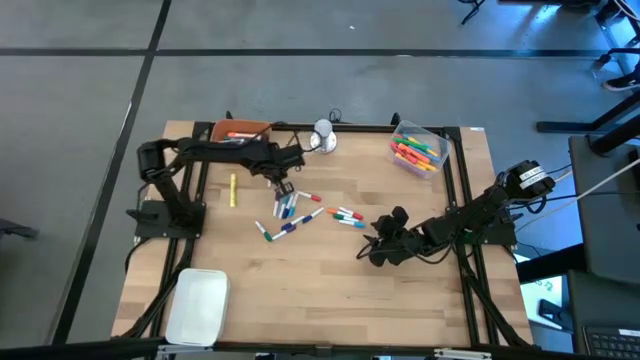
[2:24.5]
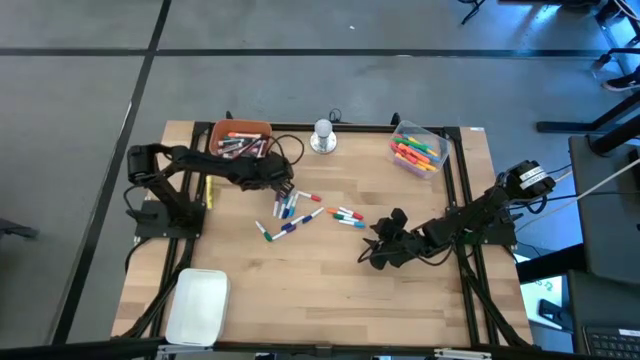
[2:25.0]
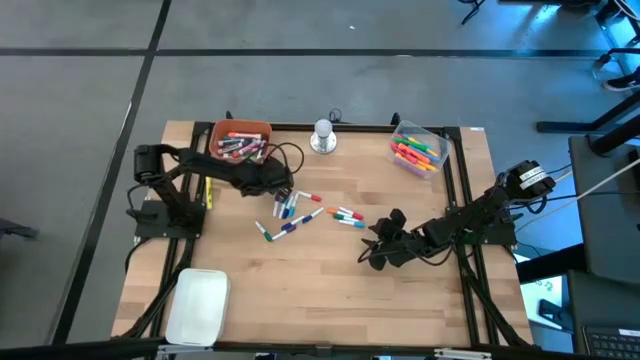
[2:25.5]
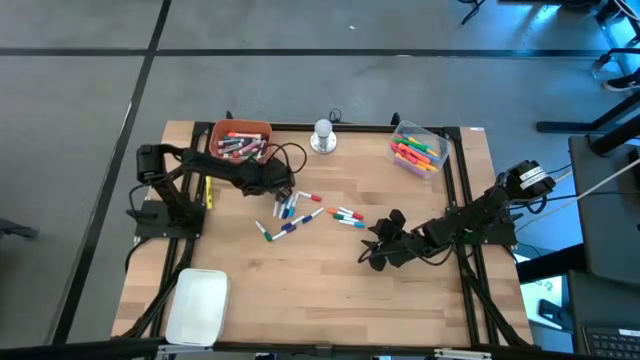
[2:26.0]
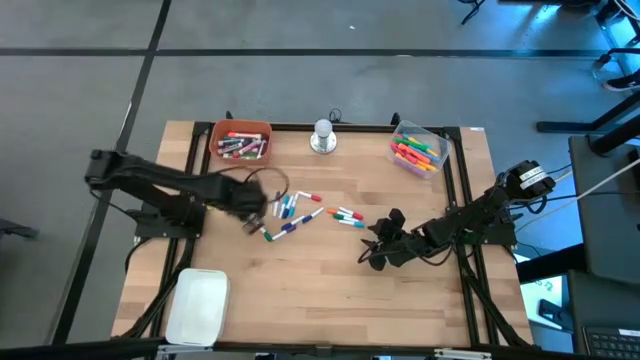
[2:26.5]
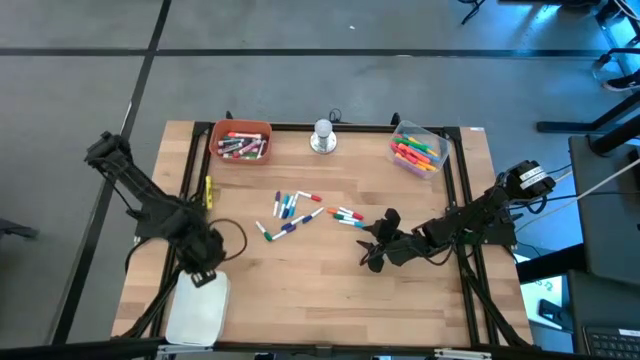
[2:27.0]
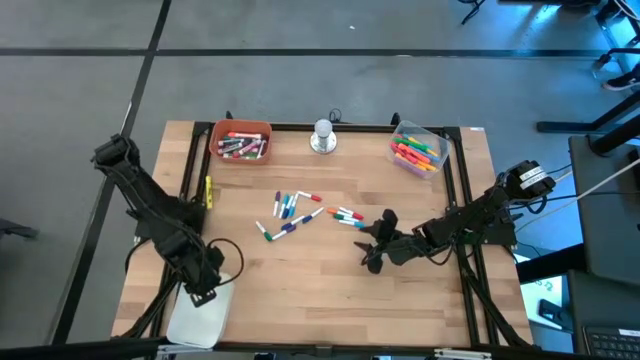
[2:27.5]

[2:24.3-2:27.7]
Task: Pick & Place Markers
Put the small yellow highlighter pen into the white bin

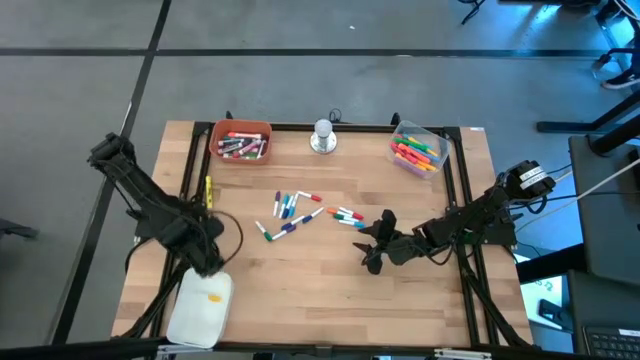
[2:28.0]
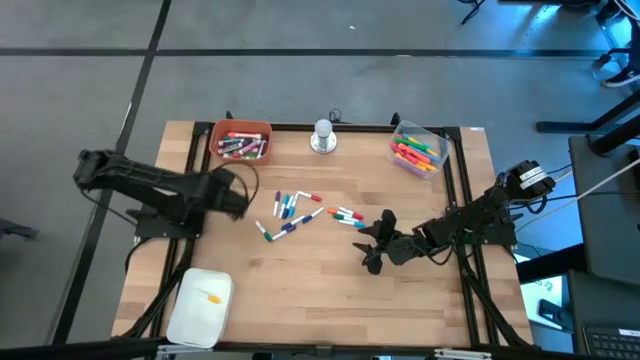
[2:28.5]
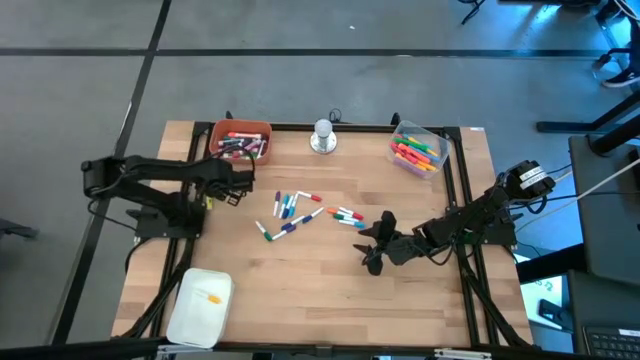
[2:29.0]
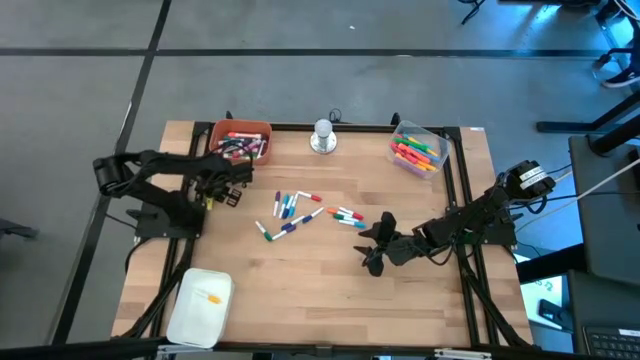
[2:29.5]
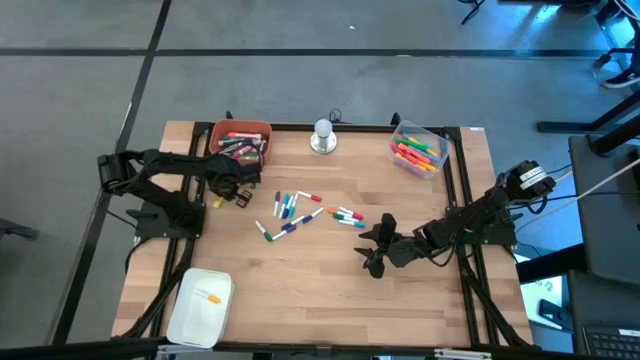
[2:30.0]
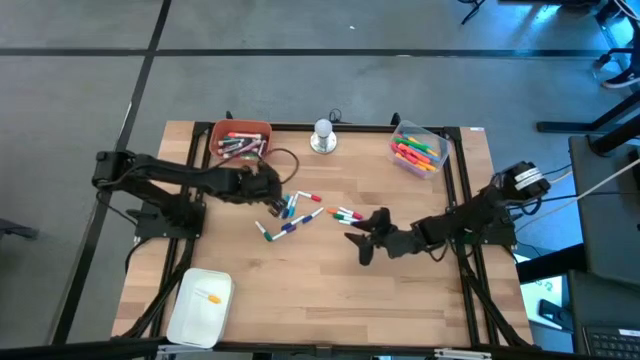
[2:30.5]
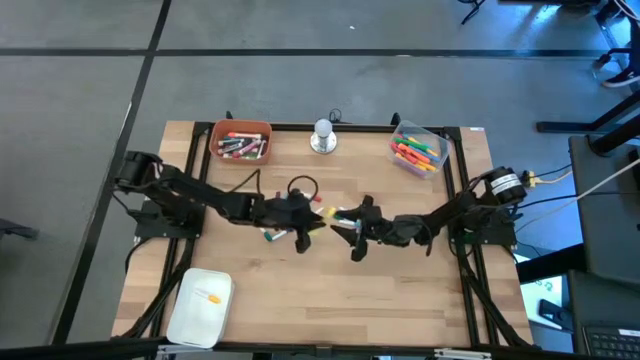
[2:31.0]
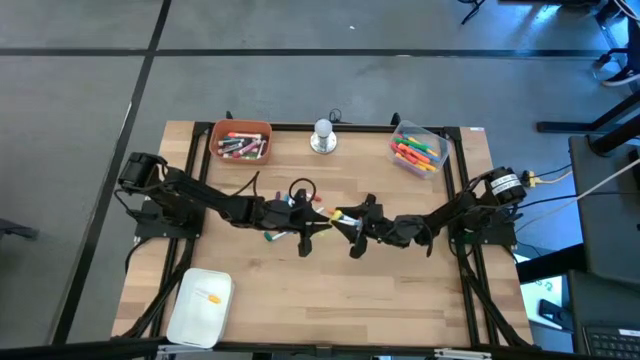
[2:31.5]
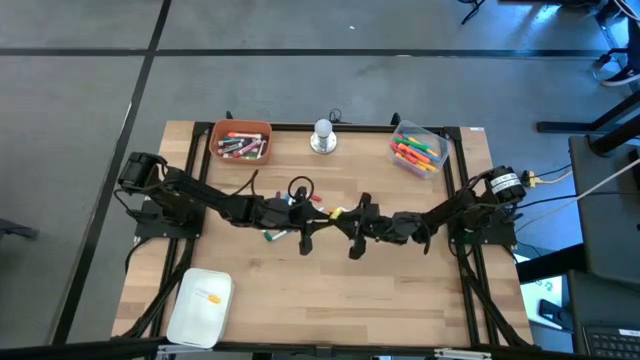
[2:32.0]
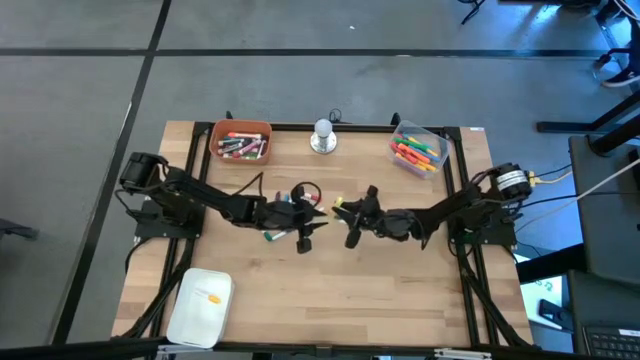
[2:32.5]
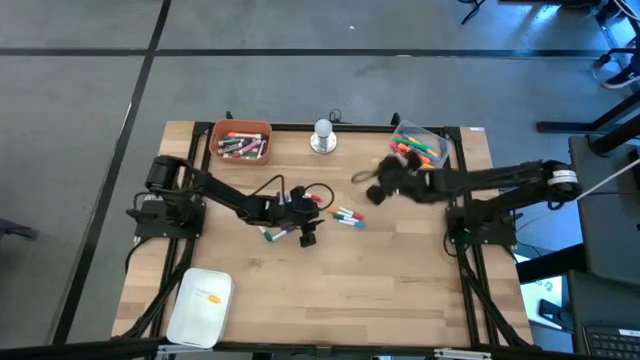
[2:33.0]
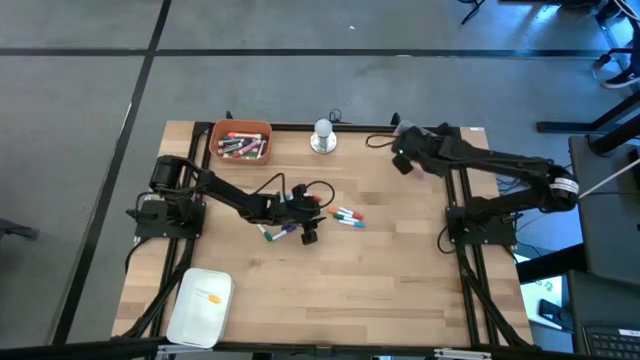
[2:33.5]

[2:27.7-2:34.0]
Put the large yellow highlighter pen into the transparent bin

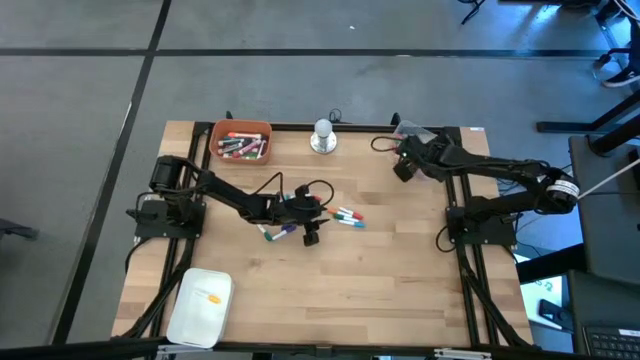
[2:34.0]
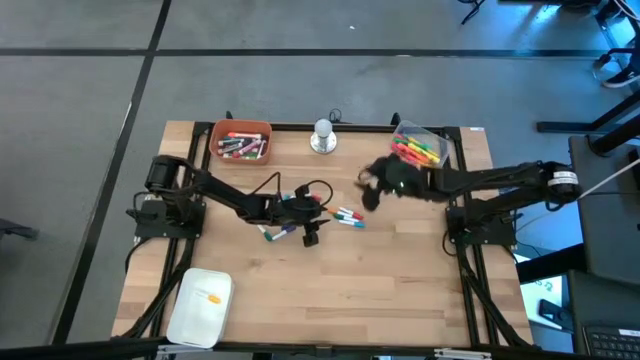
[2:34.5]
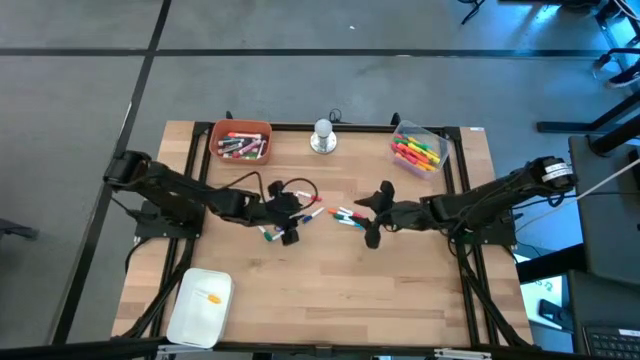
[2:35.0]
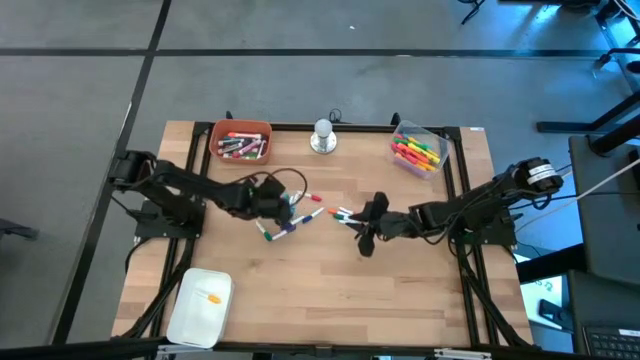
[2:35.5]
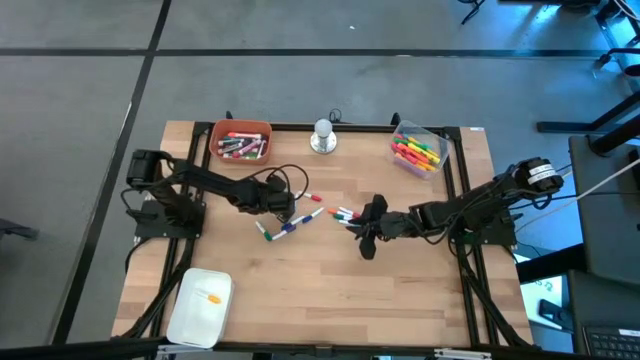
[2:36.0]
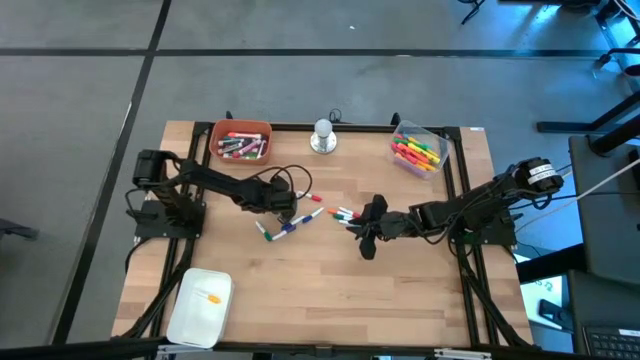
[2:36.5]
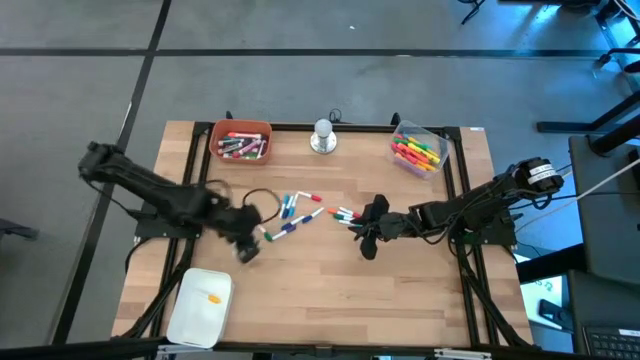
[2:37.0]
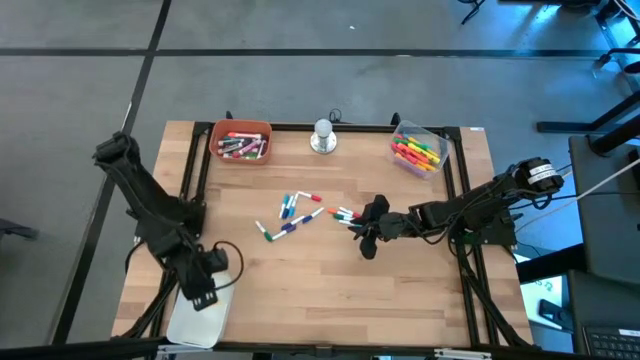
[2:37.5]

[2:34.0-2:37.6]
Put the small violet highlighter pen into the white bin

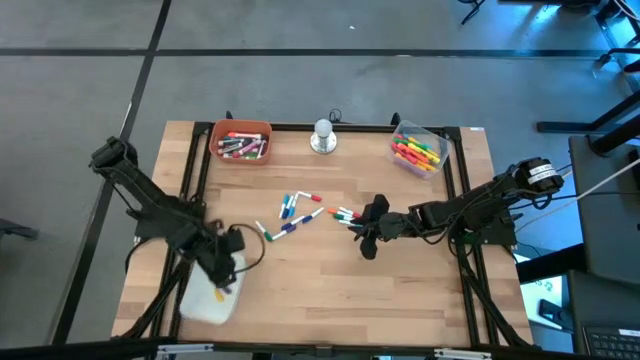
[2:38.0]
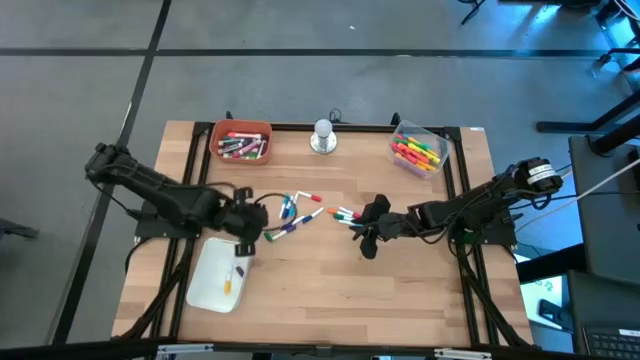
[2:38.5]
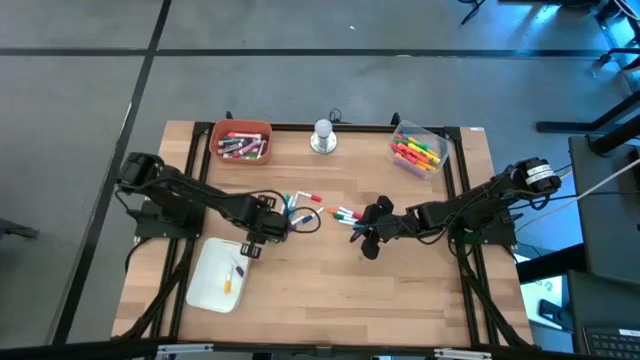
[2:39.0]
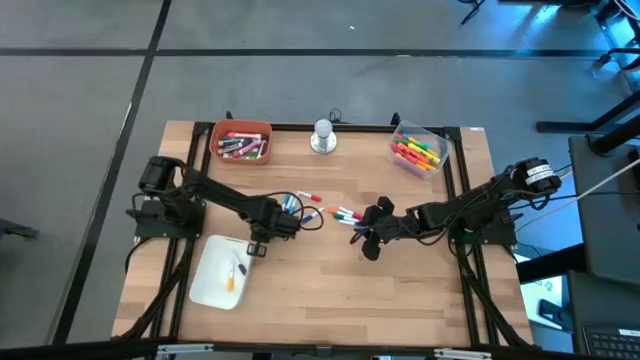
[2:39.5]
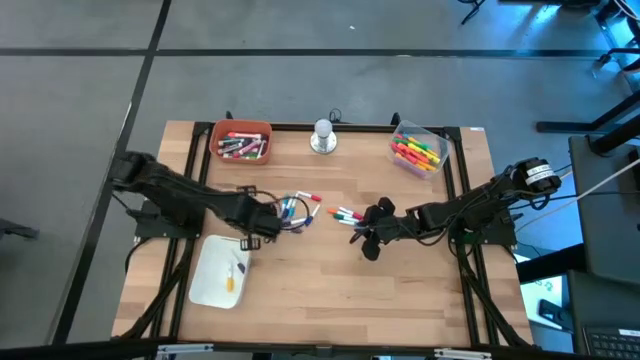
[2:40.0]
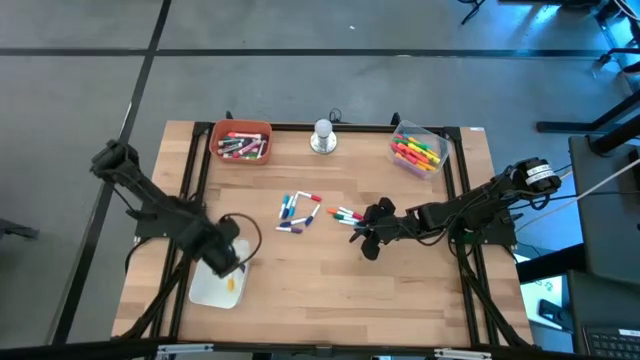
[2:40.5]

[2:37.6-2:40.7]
Put the small green highlighter pen into the white bin

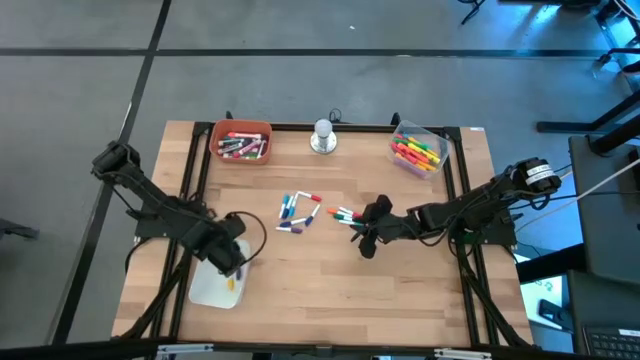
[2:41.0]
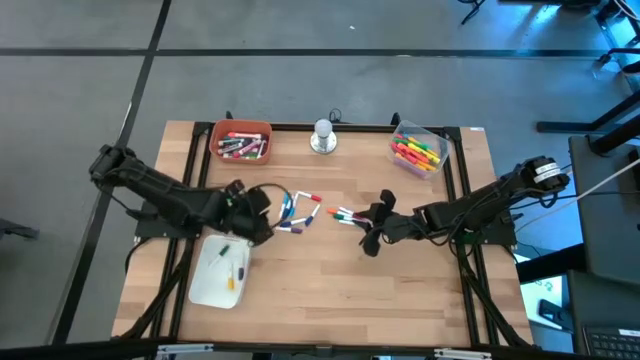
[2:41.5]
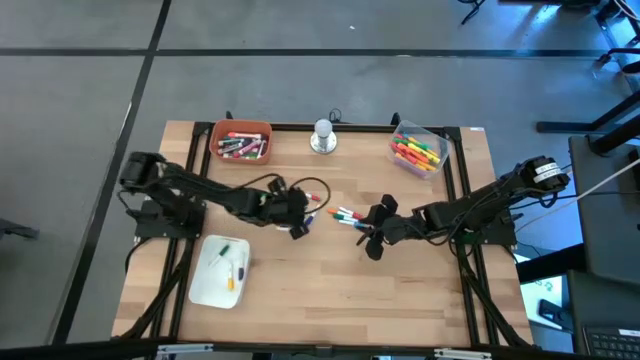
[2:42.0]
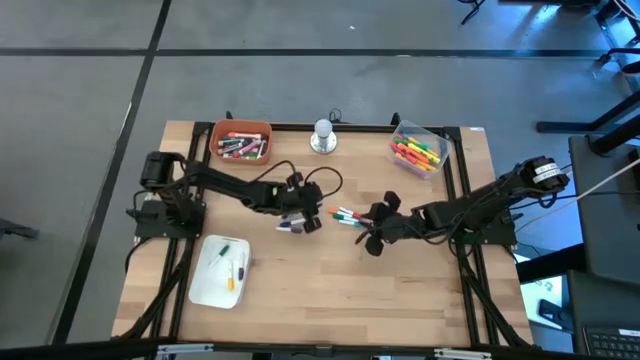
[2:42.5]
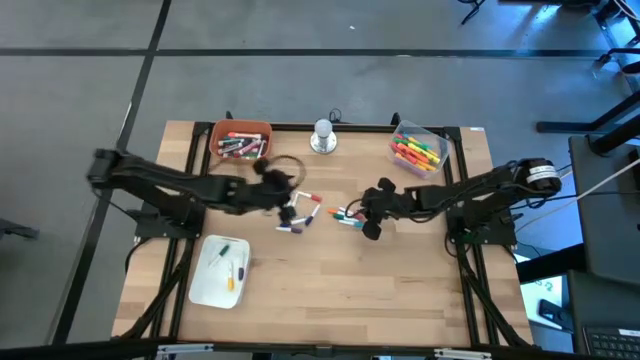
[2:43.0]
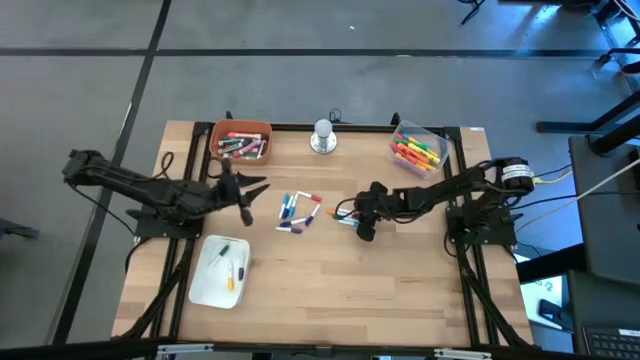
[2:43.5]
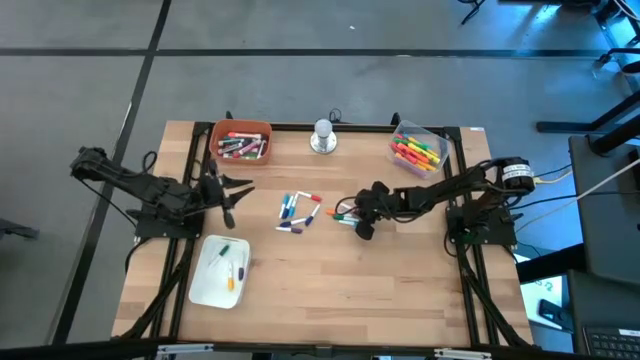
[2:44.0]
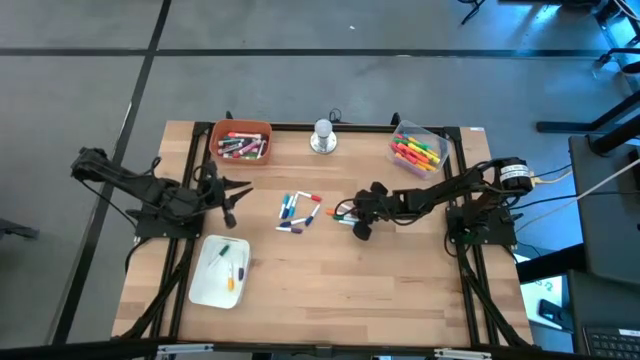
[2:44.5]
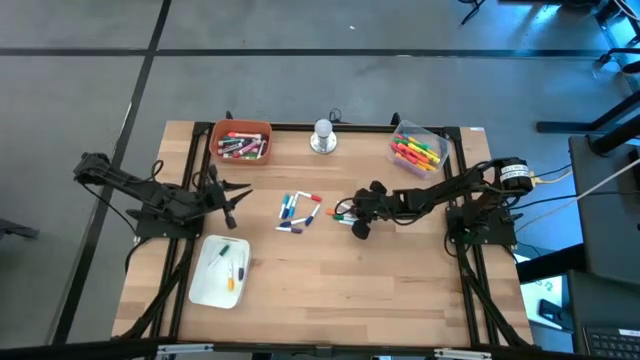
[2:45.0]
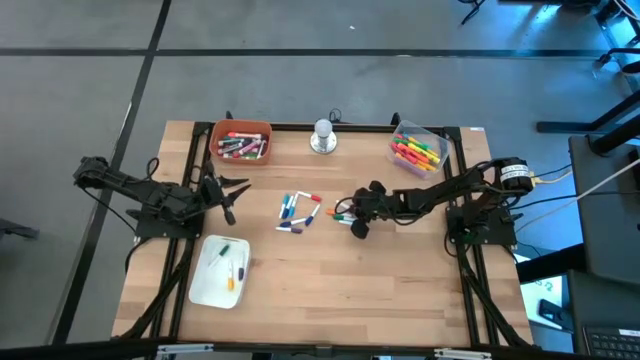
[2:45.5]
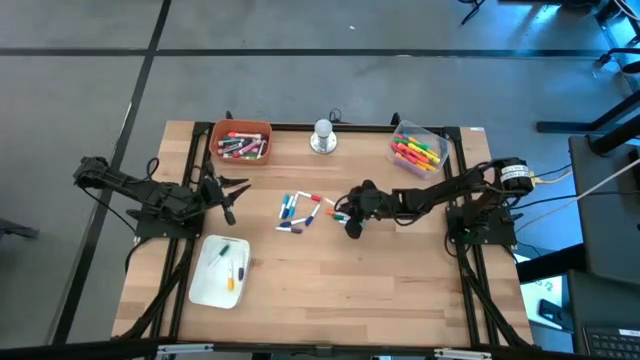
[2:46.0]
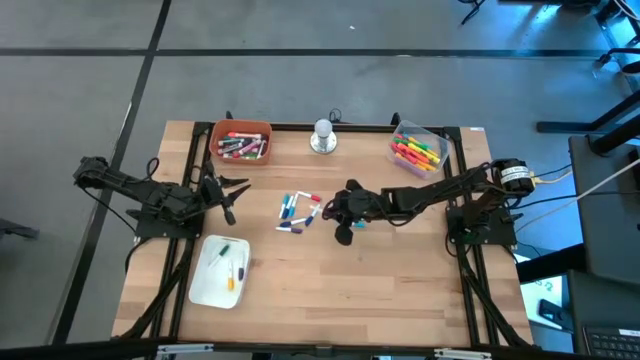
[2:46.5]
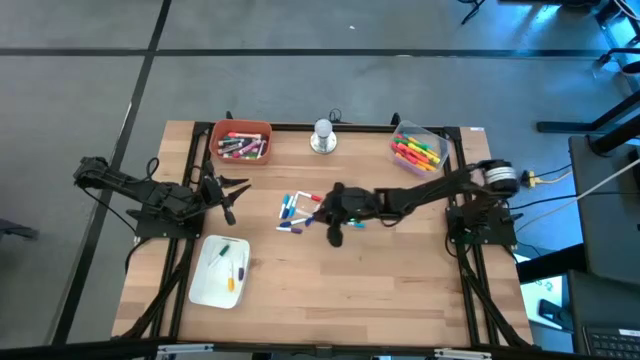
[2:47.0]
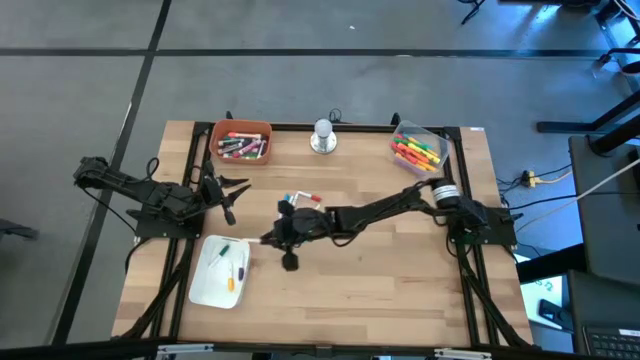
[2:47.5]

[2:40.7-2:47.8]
Put the small red highlighter pen into the white bin
